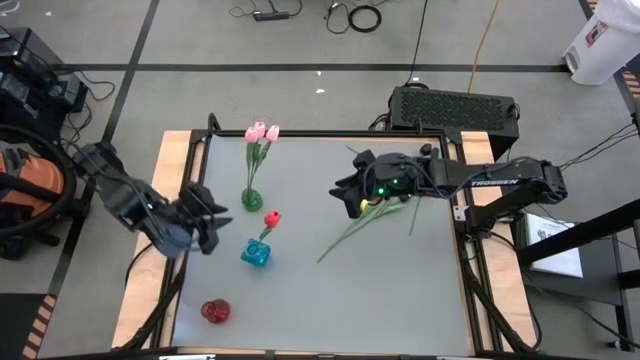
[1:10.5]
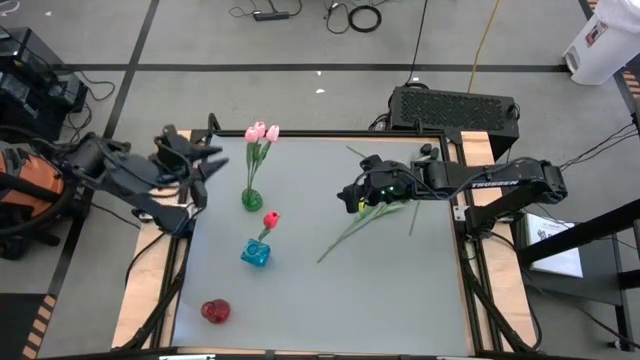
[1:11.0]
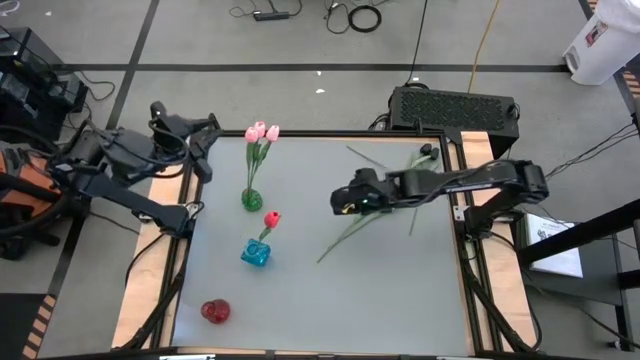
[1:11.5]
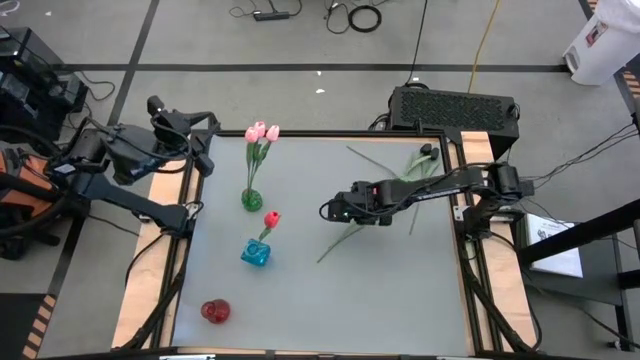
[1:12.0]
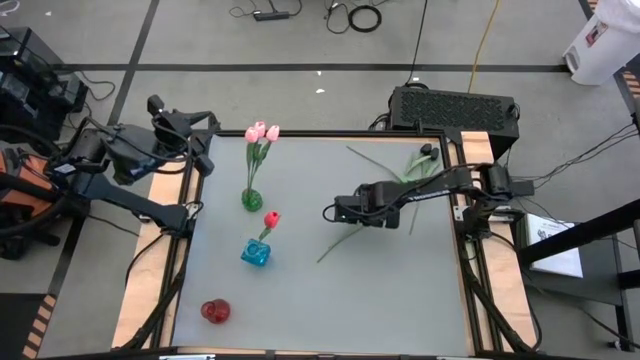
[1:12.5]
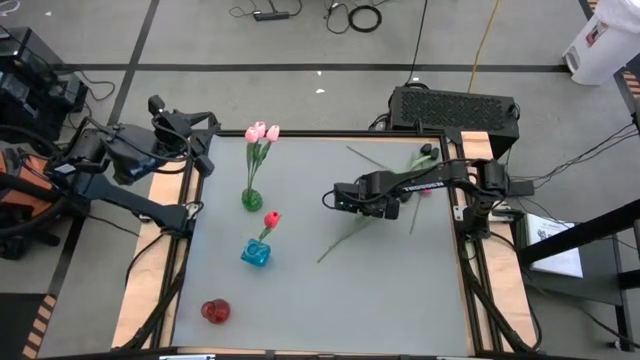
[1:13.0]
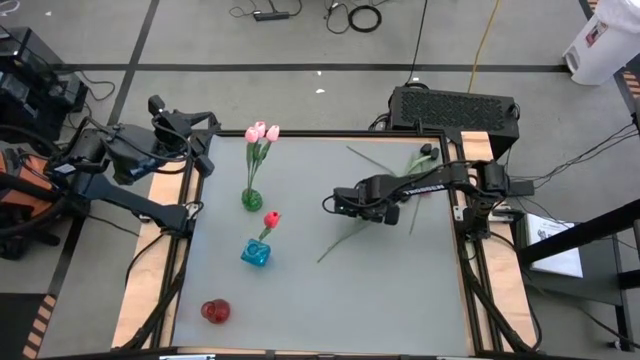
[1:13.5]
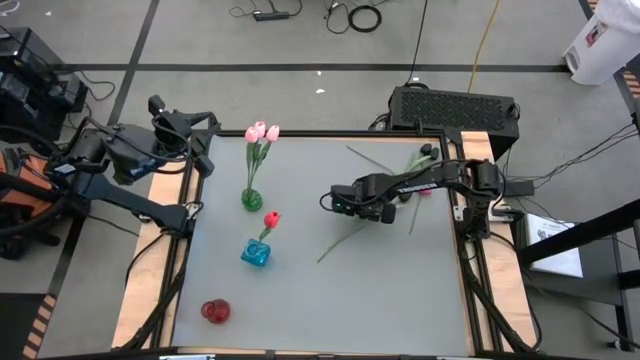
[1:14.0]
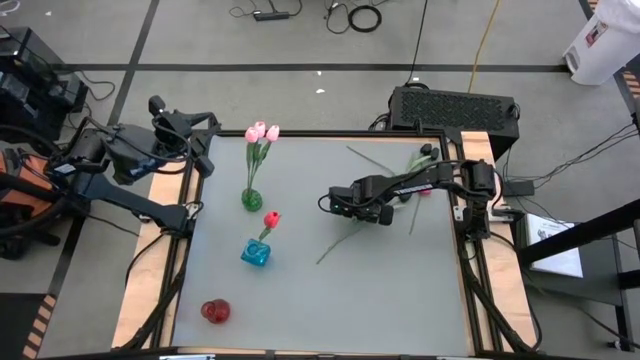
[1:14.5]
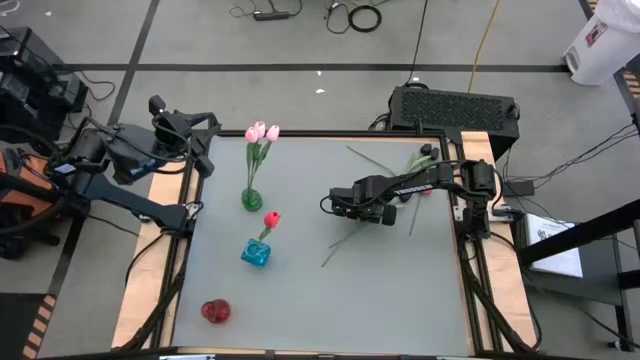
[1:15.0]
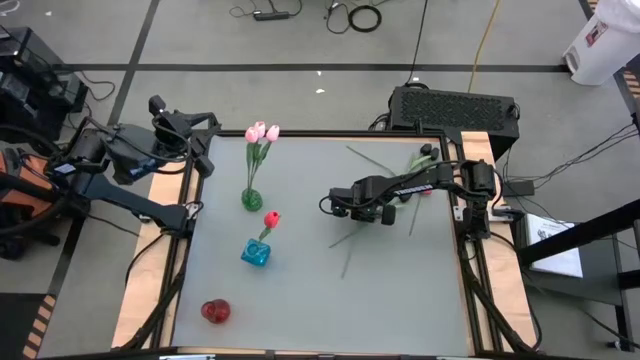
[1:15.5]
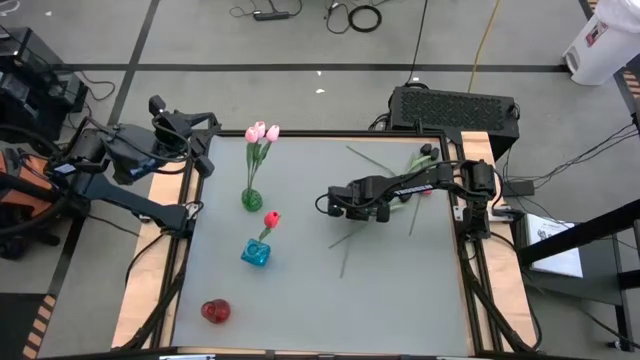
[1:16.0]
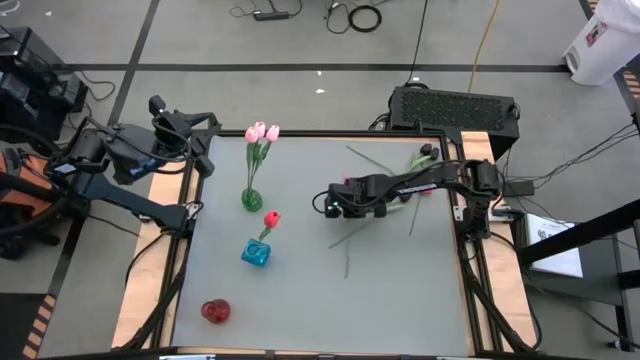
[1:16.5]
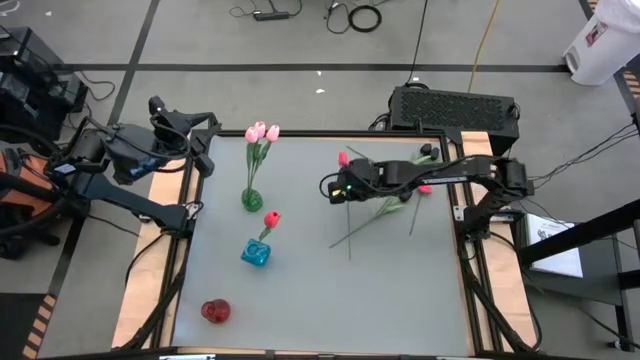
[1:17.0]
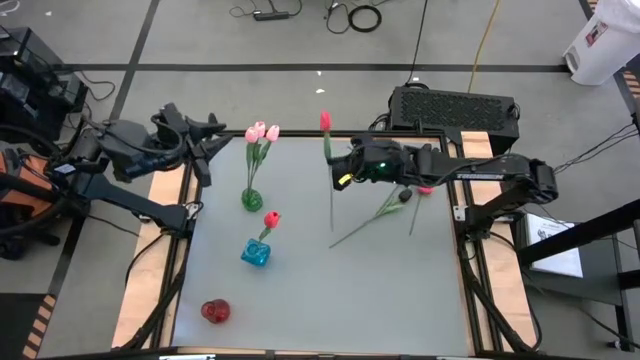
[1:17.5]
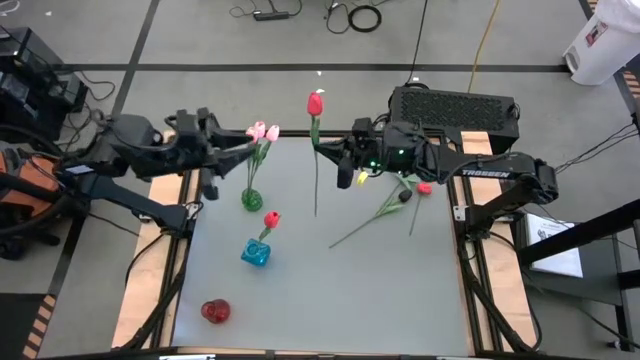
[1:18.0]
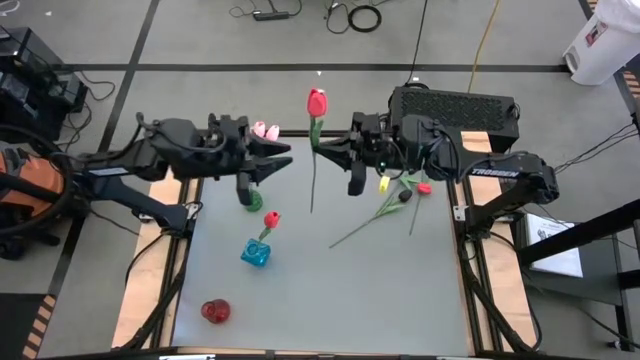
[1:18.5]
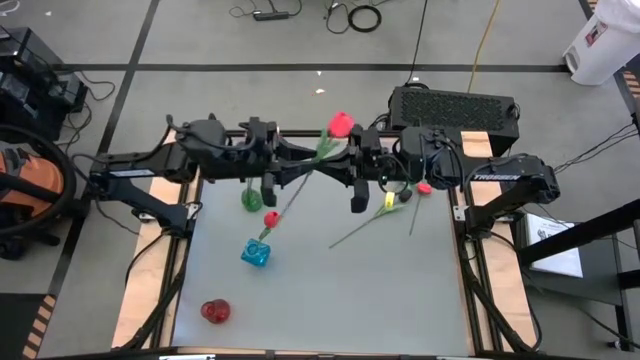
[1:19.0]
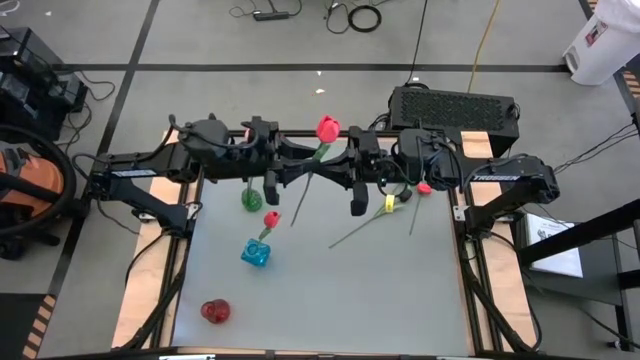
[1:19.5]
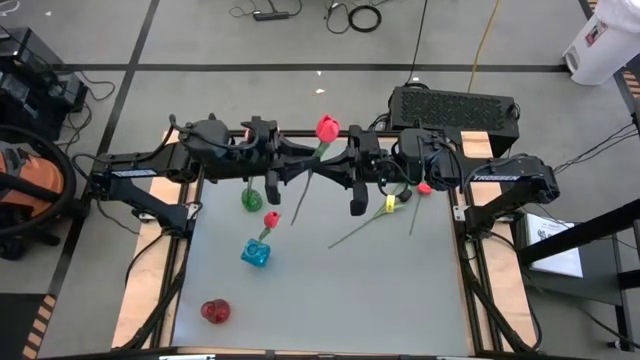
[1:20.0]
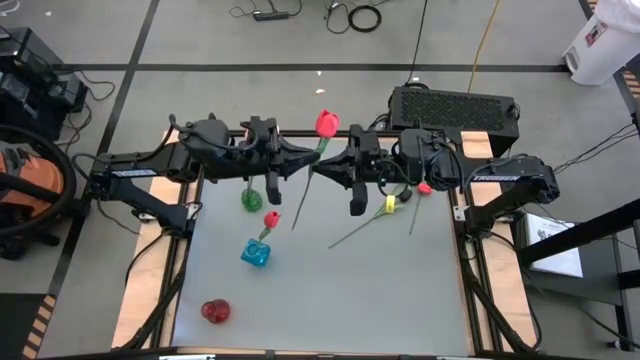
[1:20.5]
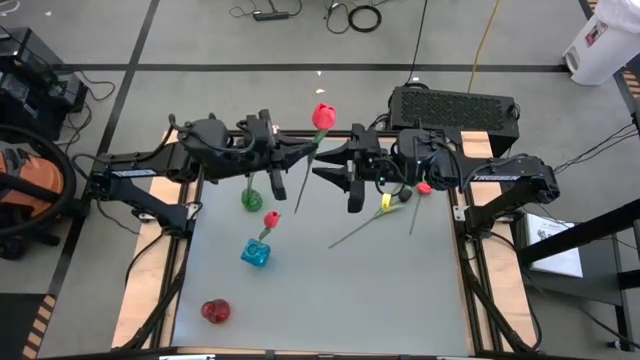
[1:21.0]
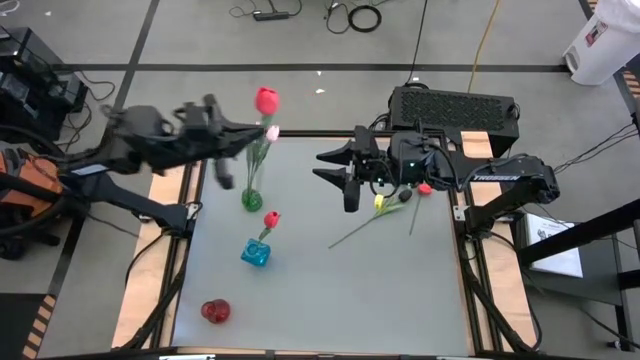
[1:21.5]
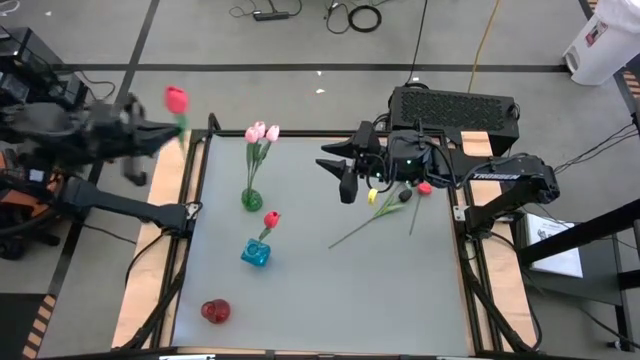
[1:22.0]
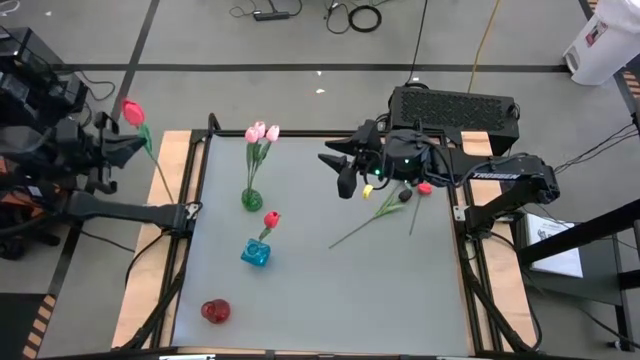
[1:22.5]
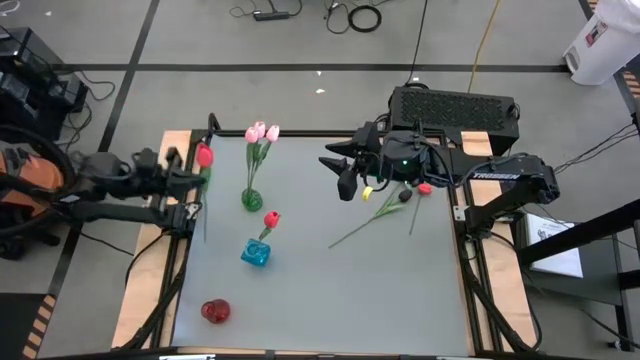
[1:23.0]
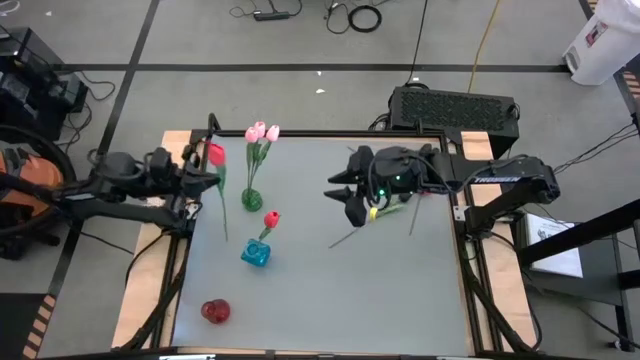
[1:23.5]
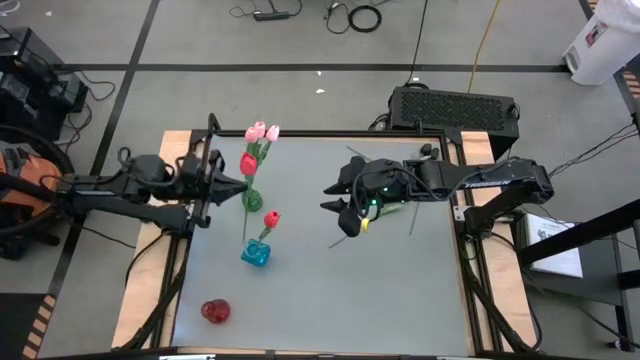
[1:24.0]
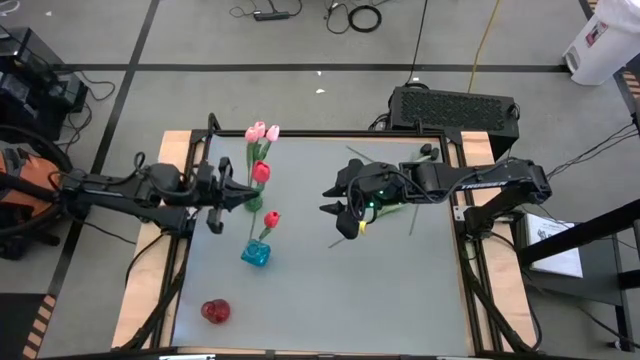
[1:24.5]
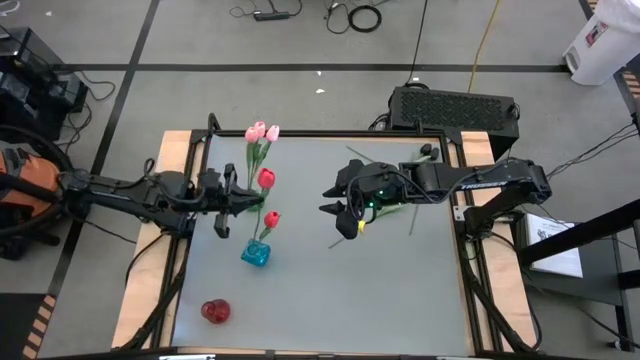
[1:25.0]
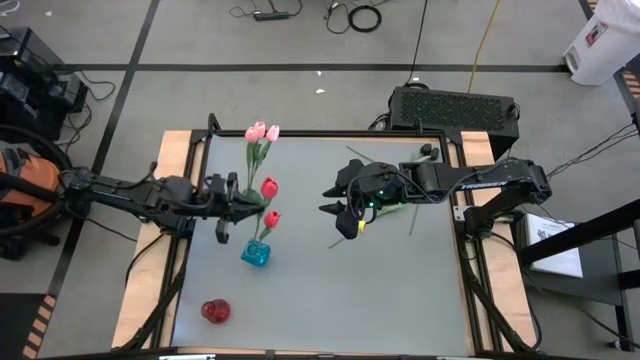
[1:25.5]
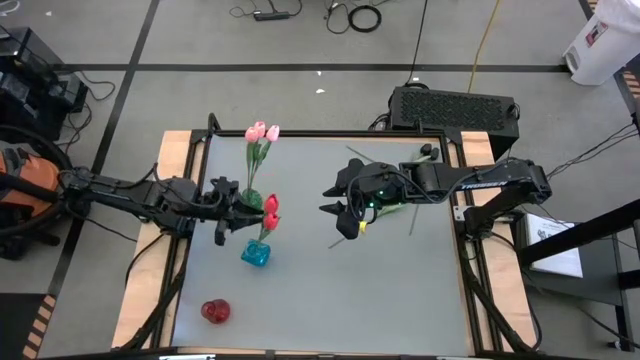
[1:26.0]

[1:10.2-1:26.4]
Task: Sort flowers into vase by color
Put the left red flower into the blue vase

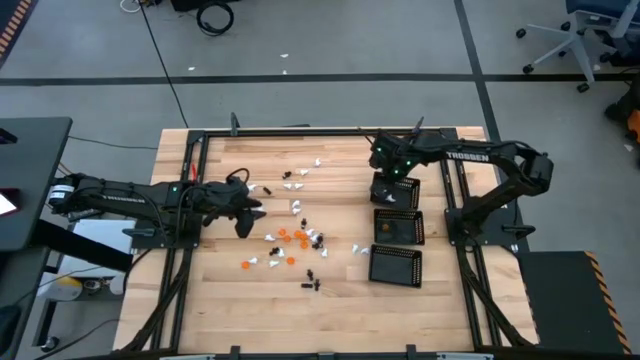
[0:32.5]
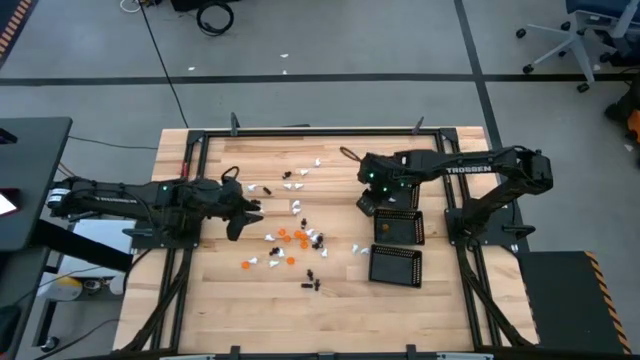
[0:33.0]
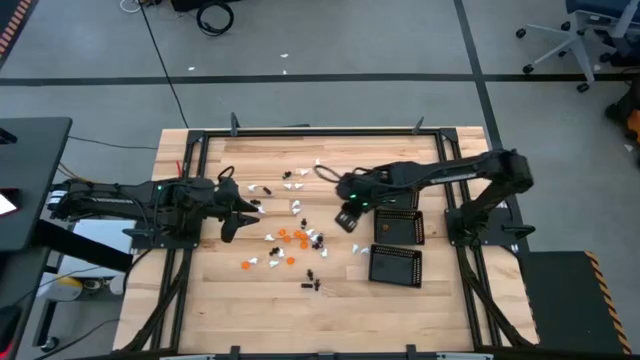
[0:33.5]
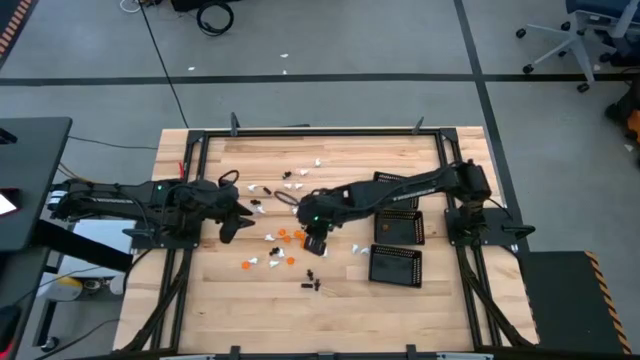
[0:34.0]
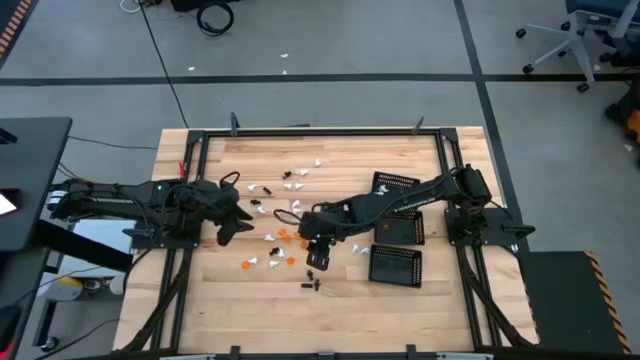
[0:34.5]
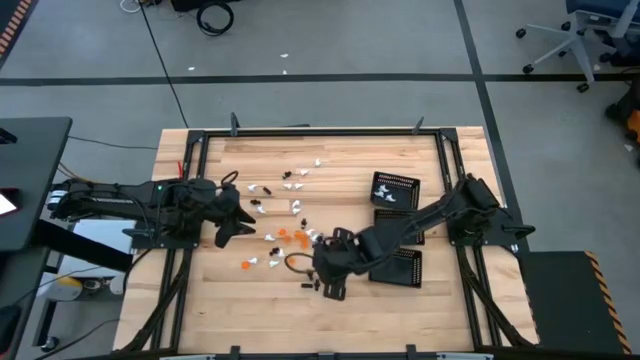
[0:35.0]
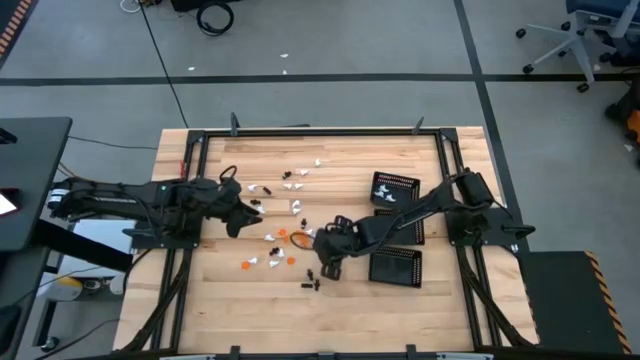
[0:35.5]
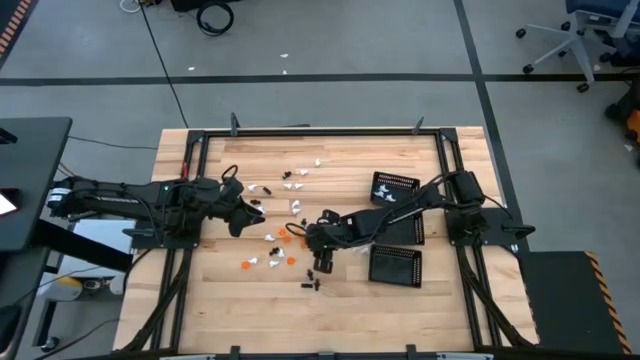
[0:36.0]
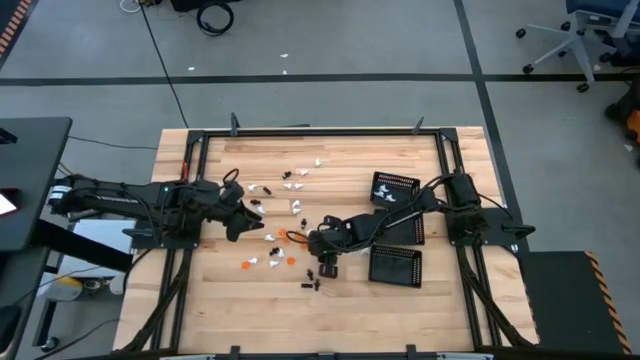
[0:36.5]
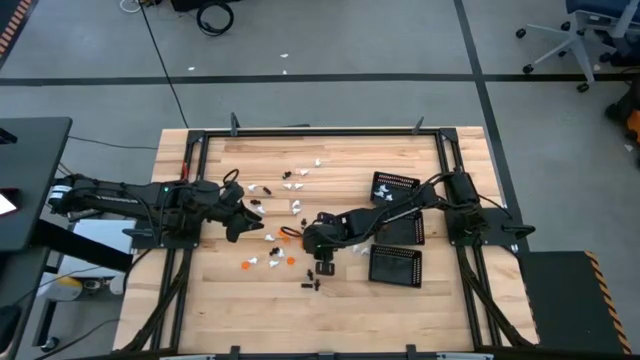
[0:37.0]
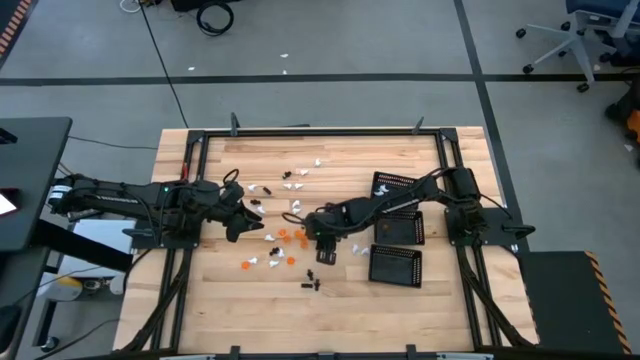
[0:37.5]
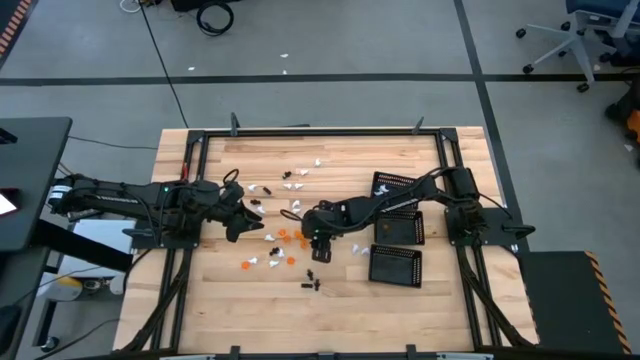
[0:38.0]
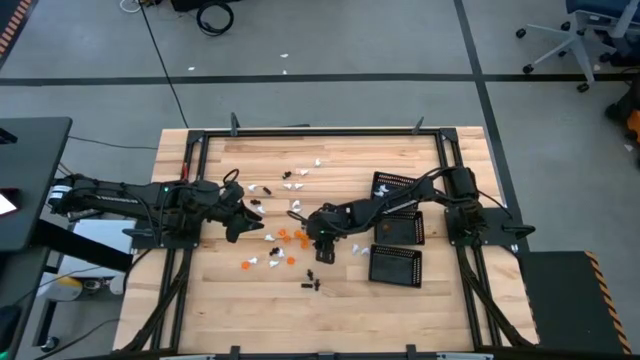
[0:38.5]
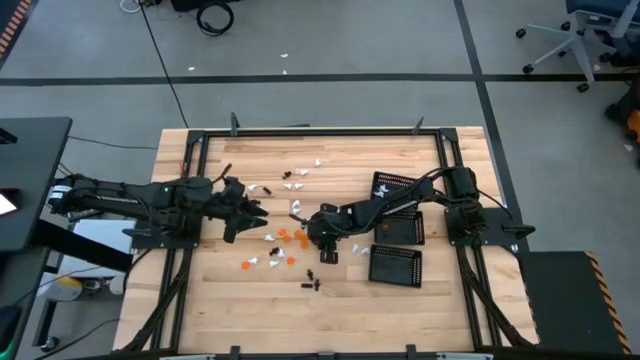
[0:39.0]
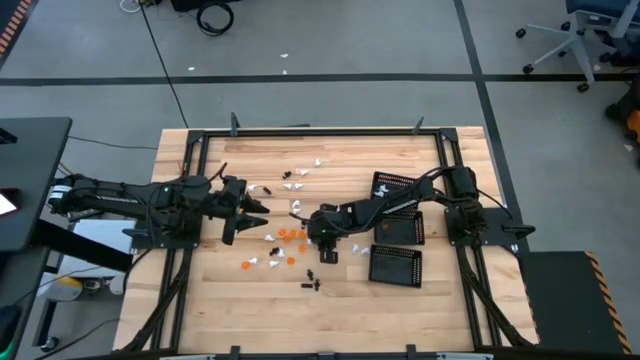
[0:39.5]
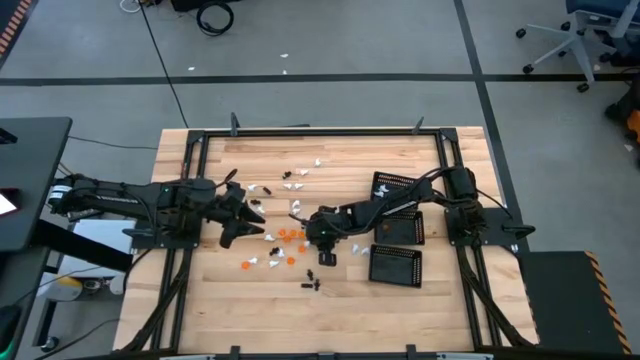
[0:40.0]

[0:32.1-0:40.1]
Task: Sort Halloween decoration
Put the white ghost toy into the top black bin
